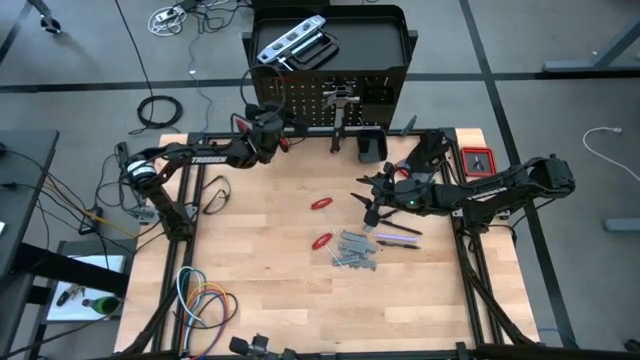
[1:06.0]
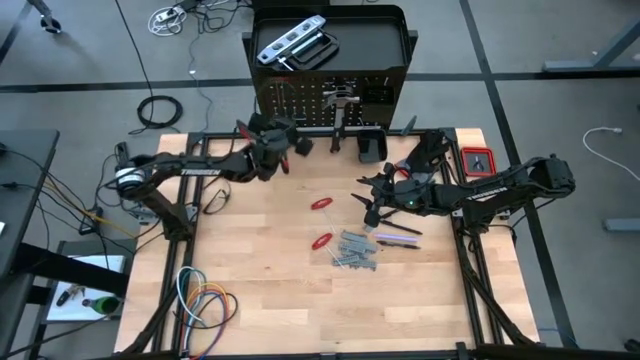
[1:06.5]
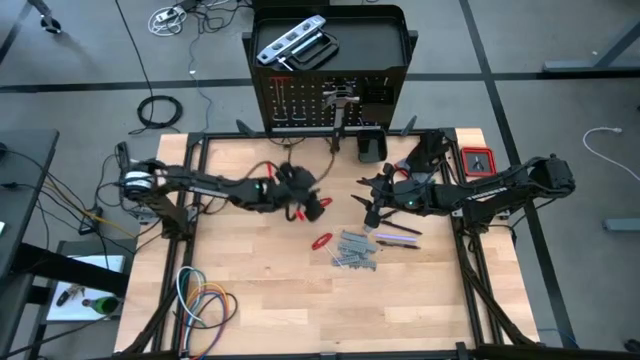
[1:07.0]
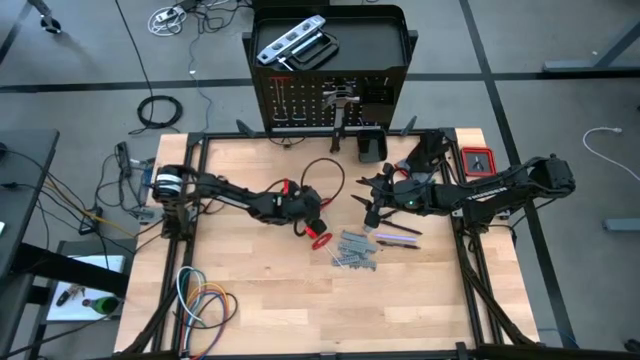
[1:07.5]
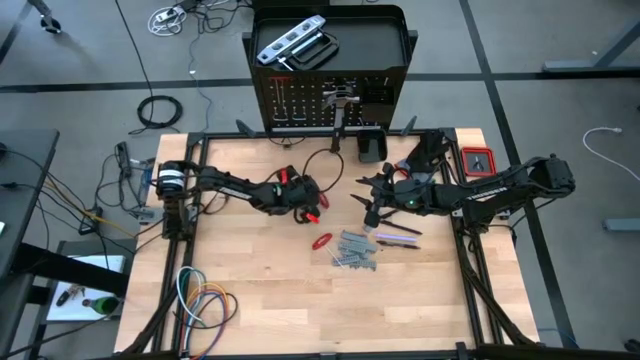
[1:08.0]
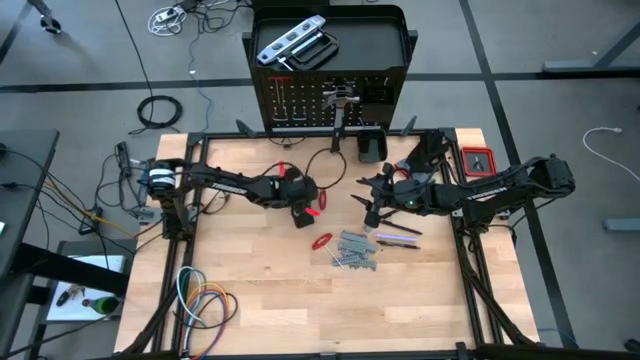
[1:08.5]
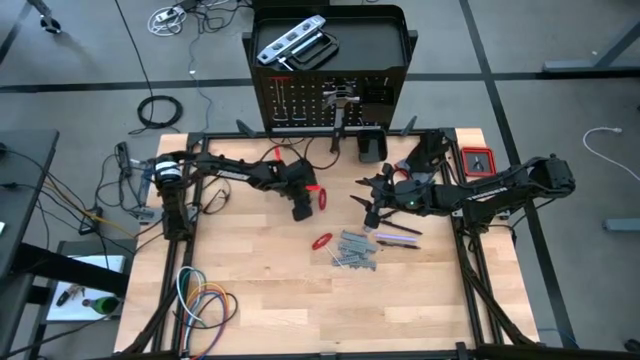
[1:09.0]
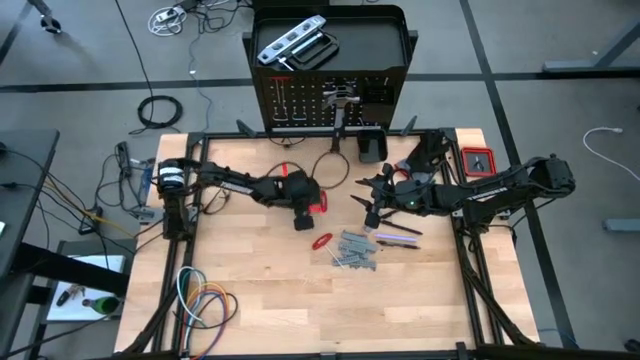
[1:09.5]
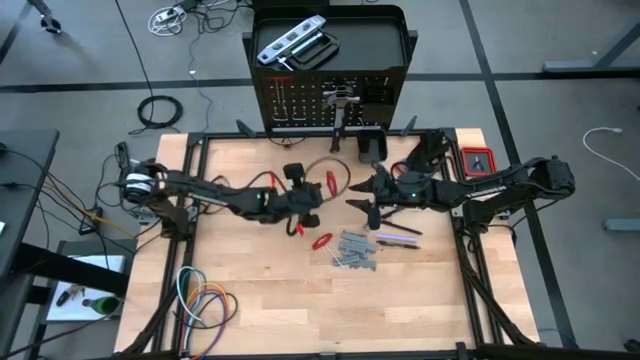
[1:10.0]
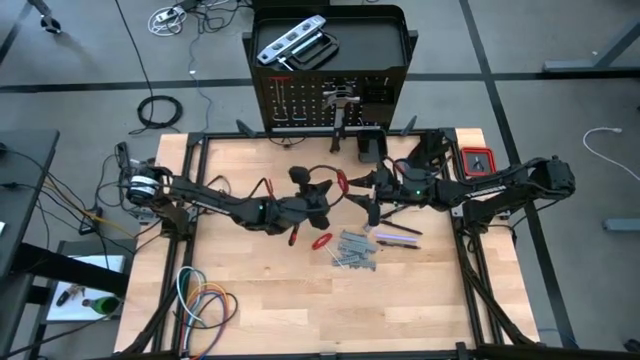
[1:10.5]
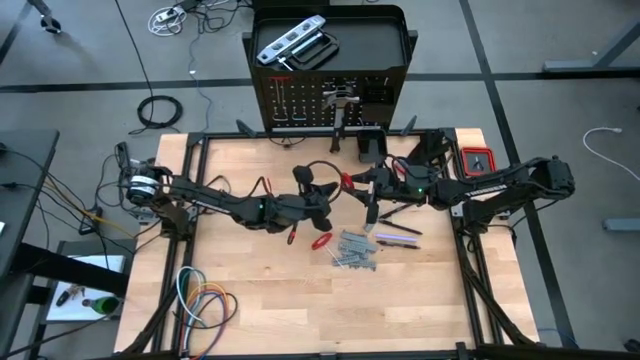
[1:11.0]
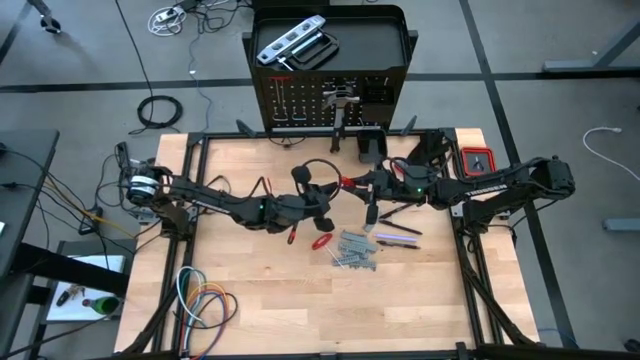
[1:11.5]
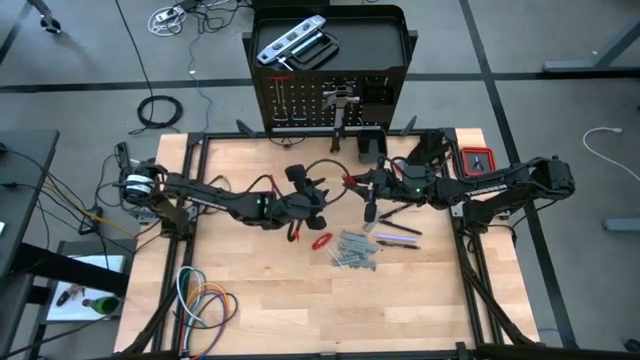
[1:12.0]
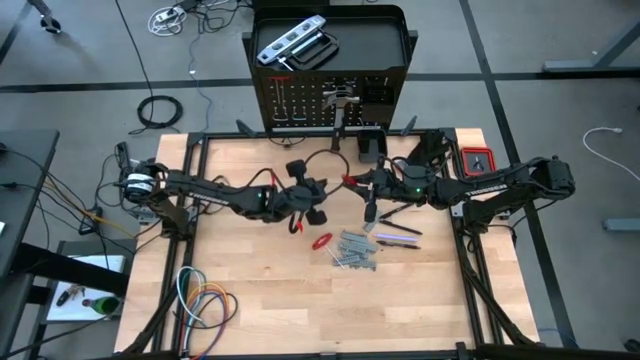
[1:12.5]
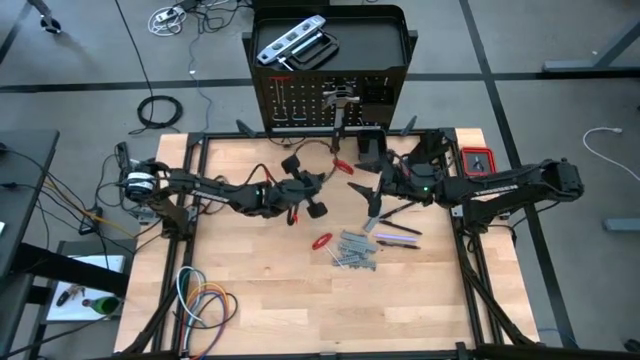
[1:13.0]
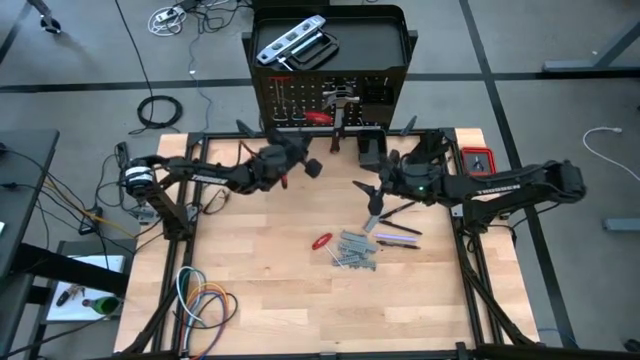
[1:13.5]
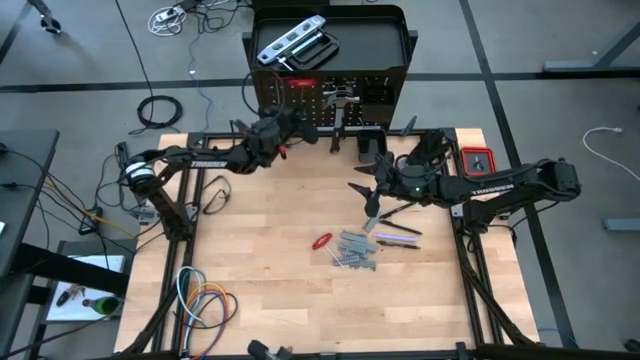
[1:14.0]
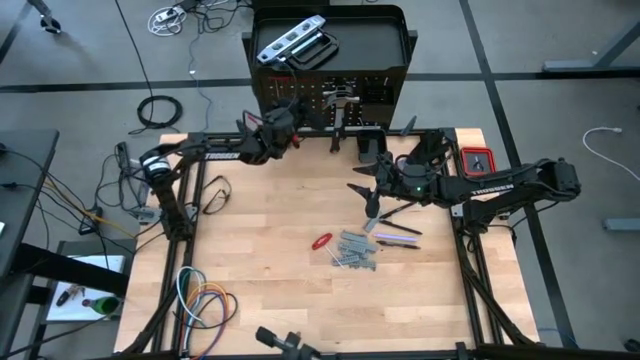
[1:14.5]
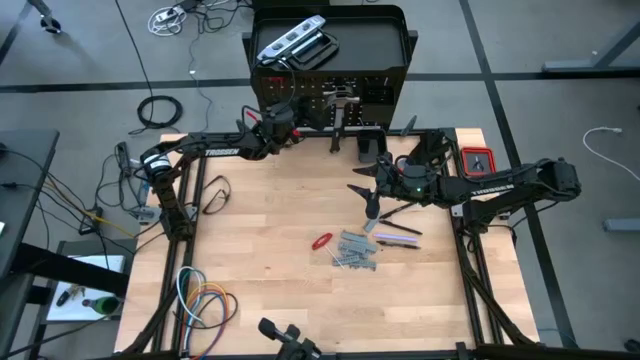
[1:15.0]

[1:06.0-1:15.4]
Task: Hang tools onto peg board
Hang the top allen wrench onto the peg board

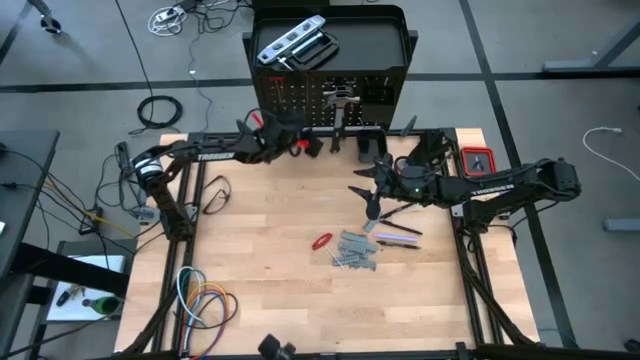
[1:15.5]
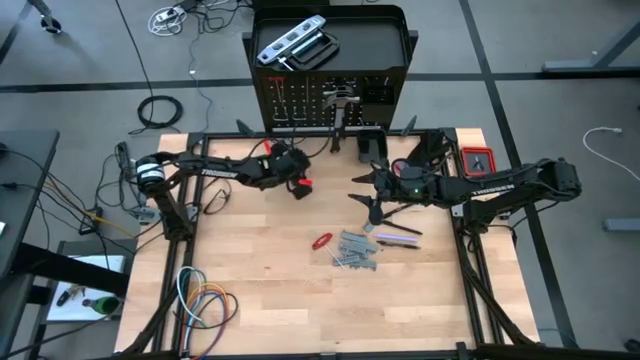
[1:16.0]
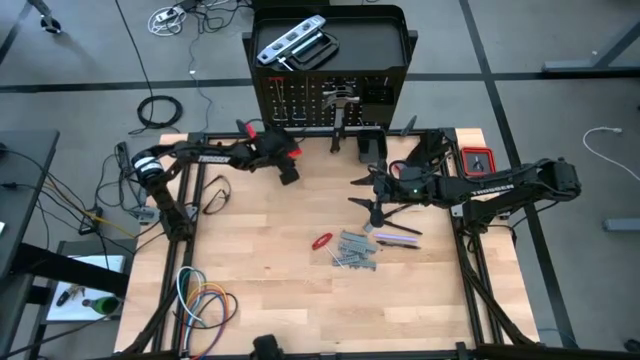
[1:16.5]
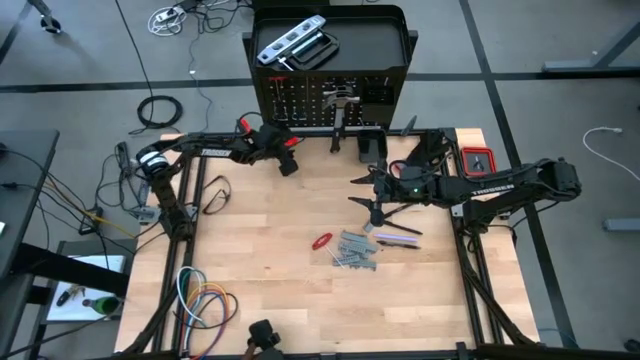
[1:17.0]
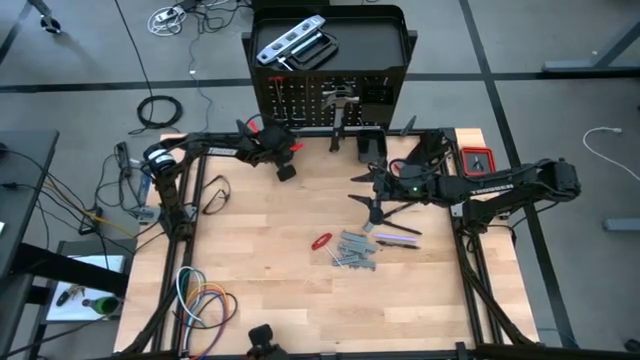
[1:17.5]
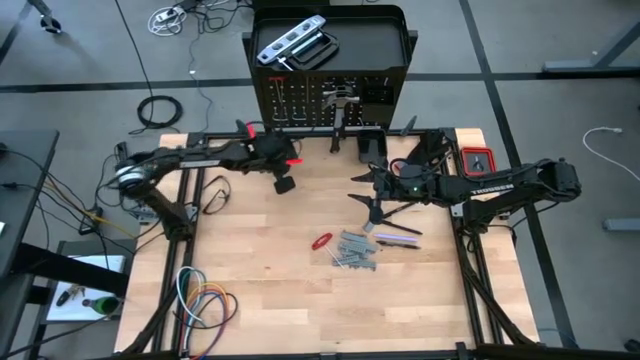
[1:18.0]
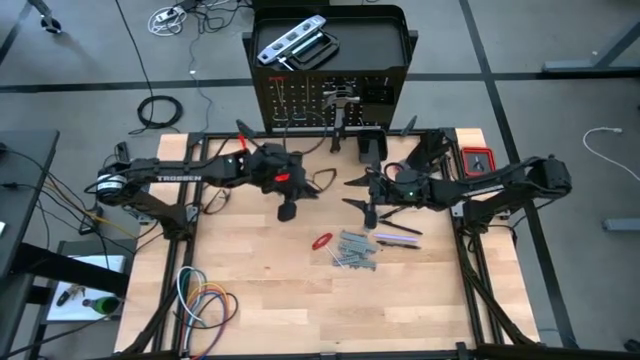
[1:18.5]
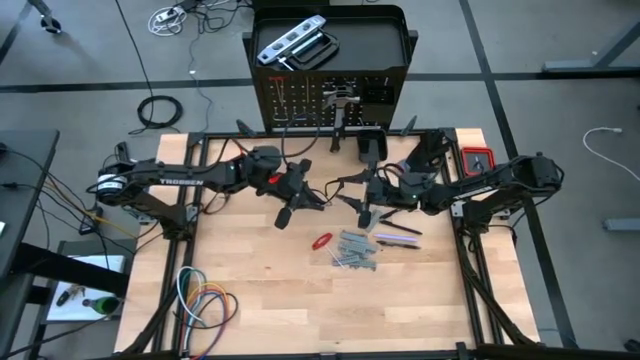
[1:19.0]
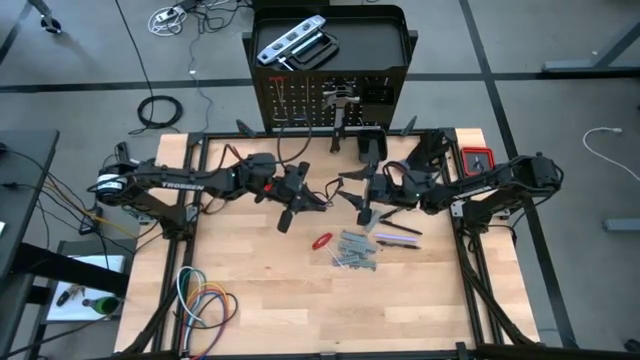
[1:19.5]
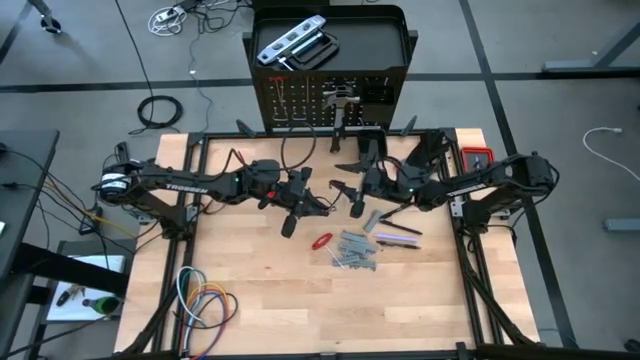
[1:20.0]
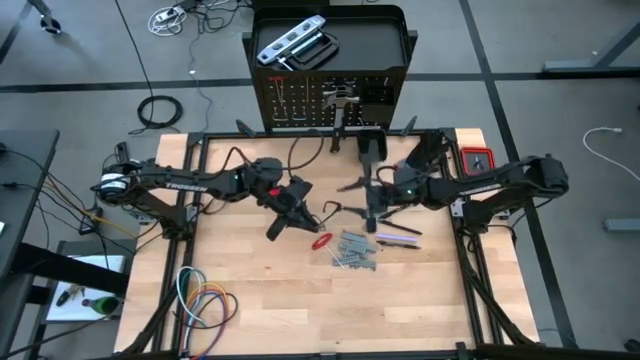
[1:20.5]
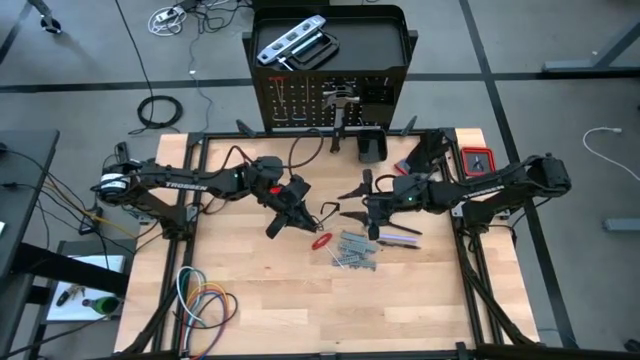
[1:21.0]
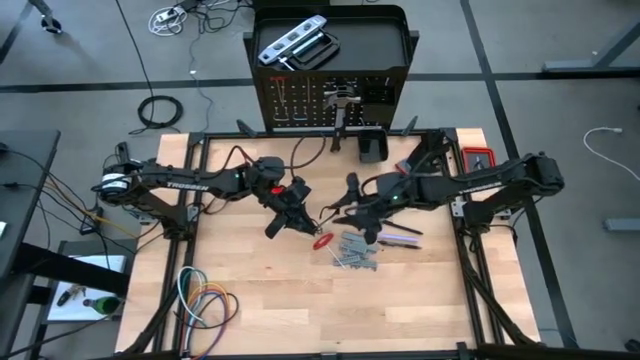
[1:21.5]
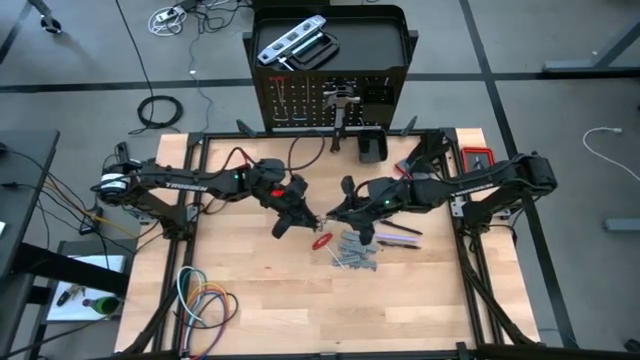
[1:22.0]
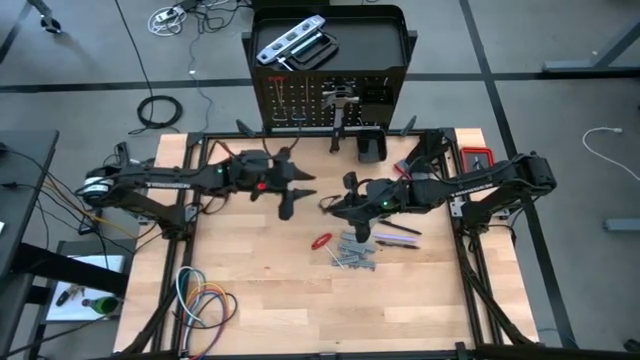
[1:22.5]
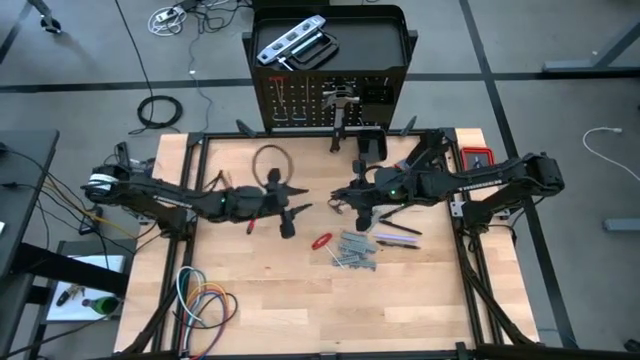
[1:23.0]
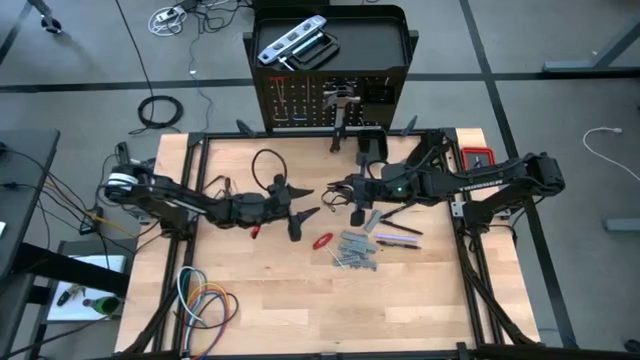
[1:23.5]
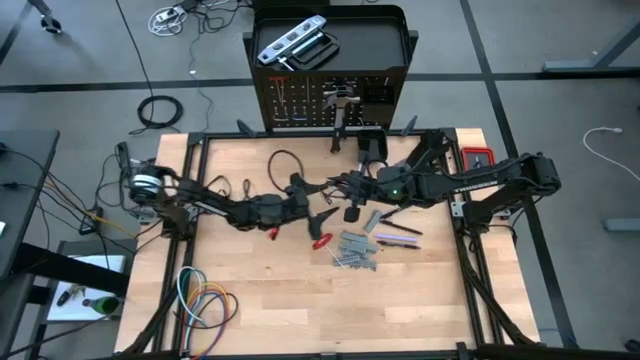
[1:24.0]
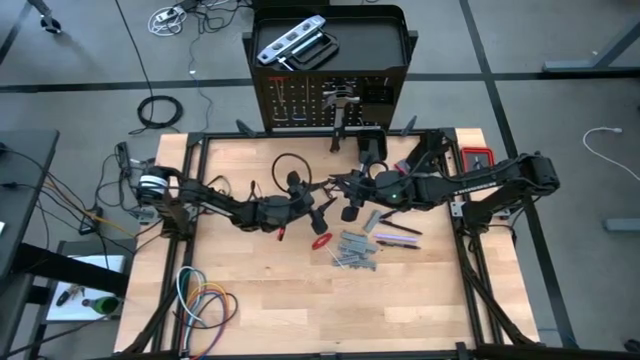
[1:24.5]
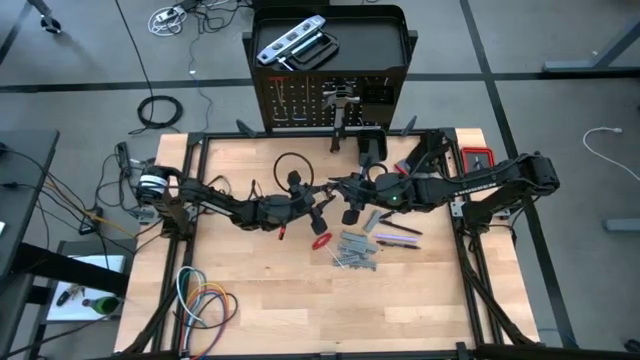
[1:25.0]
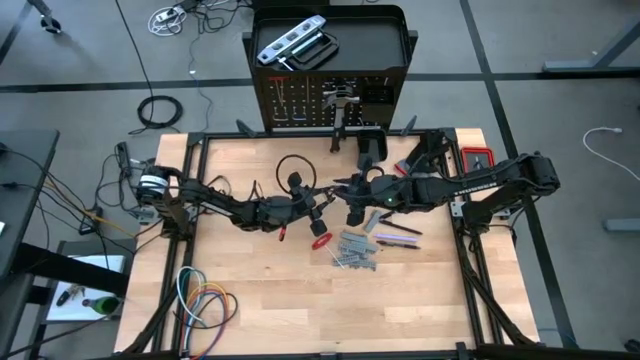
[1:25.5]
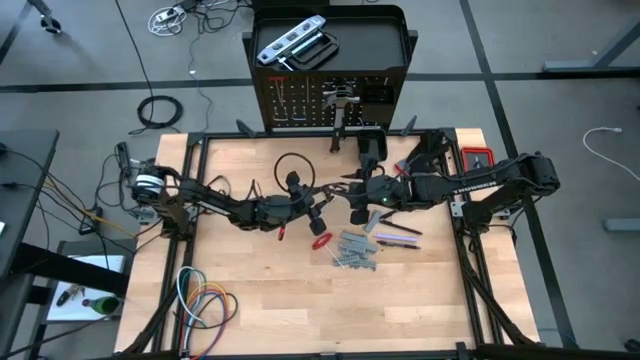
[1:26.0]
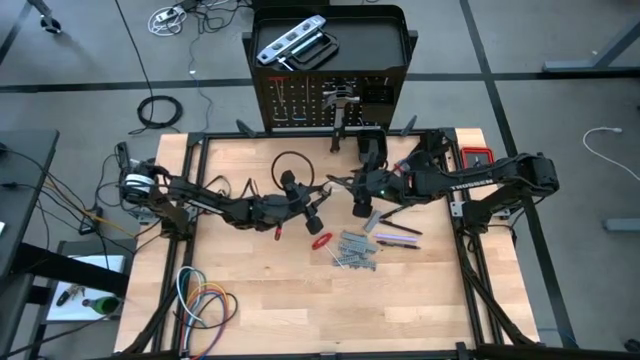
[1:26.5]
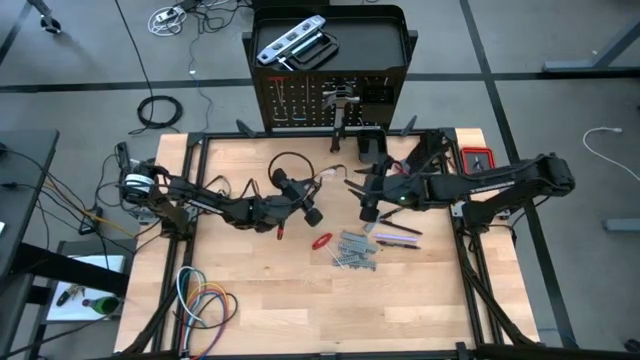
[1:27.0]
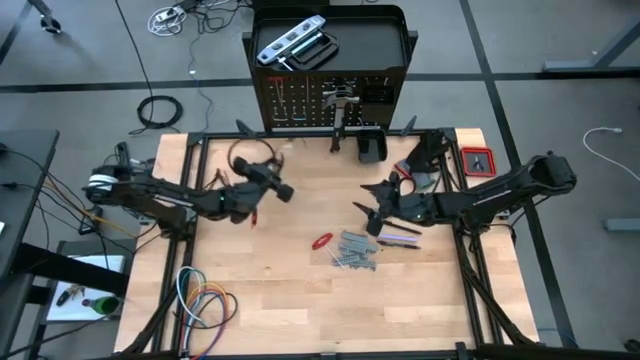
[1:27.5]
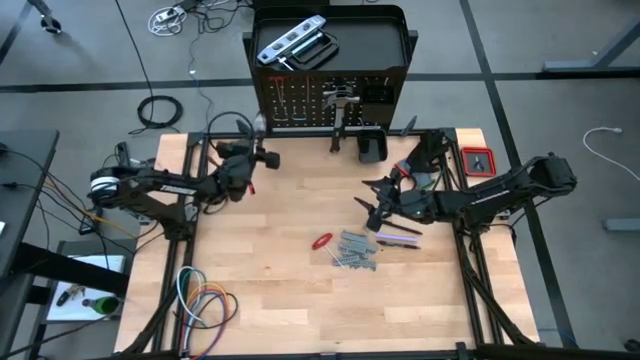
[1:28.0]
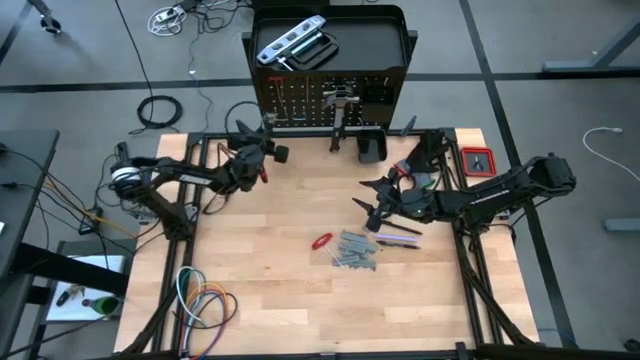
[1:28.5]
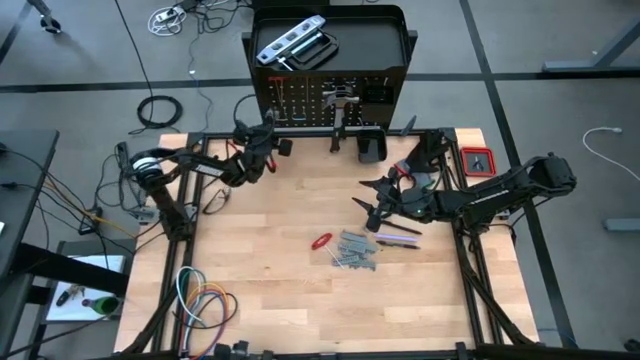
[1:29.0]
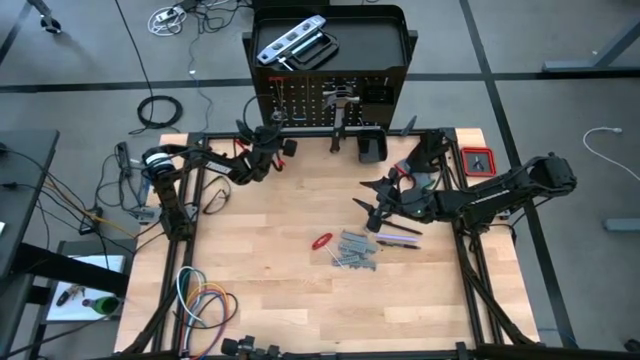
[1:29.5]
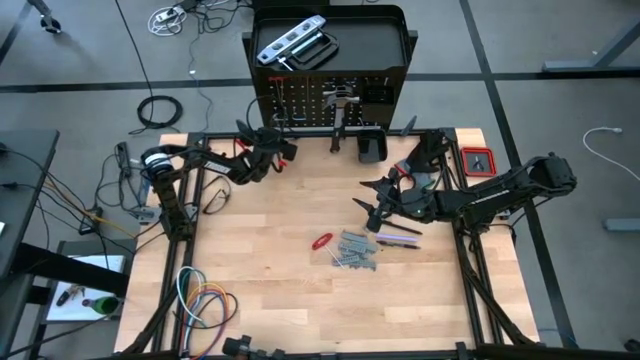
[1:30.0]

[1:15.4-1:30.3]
Hang the top glasses onto the peg board
